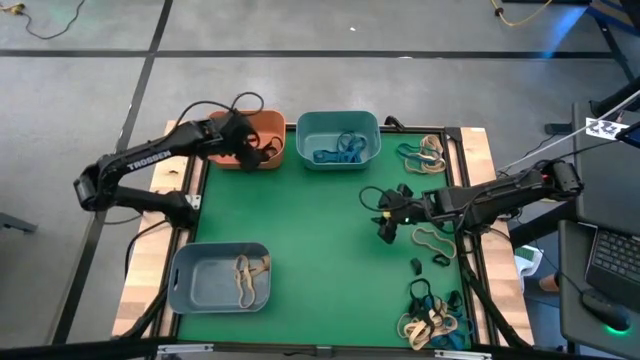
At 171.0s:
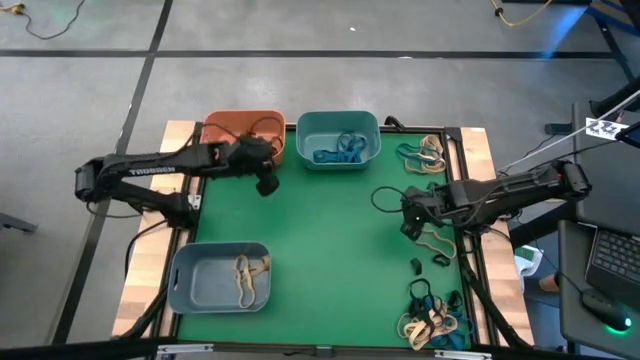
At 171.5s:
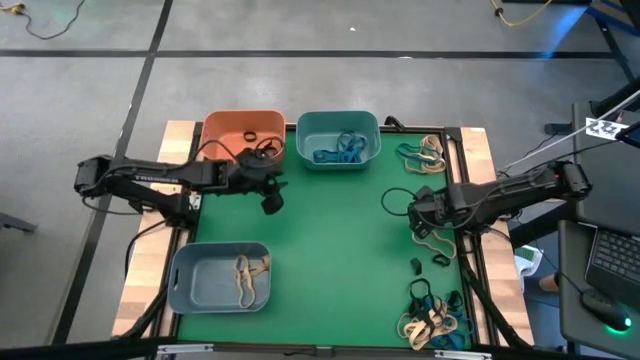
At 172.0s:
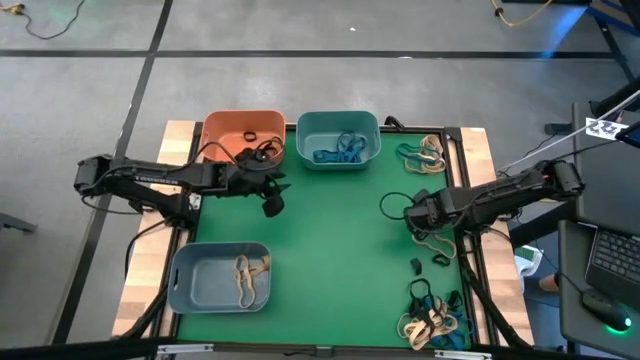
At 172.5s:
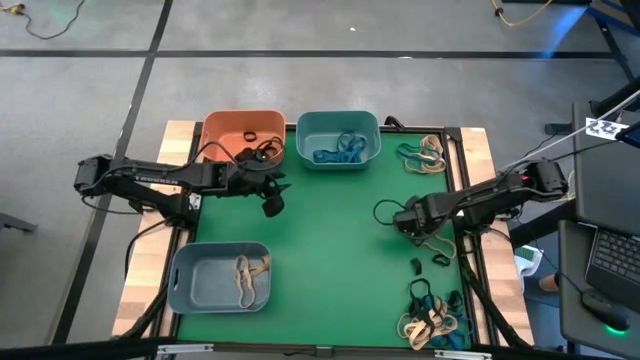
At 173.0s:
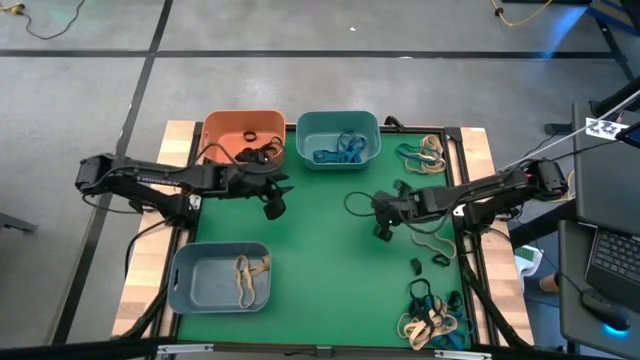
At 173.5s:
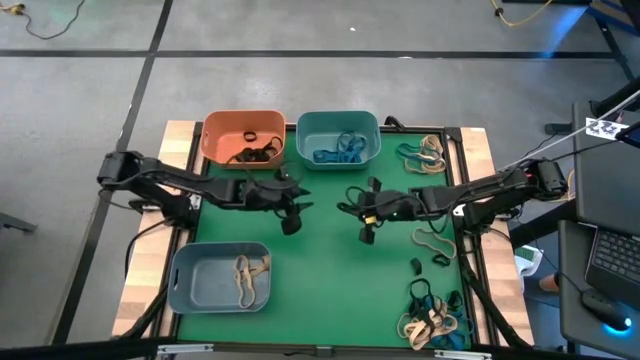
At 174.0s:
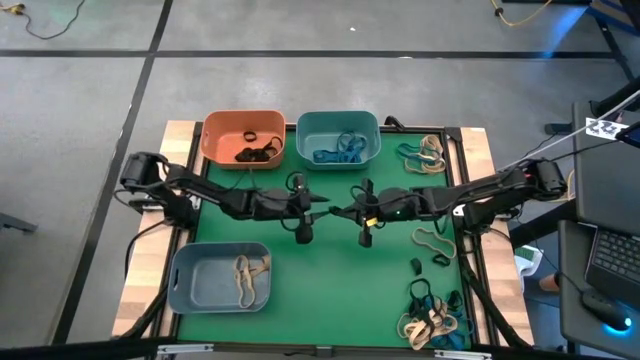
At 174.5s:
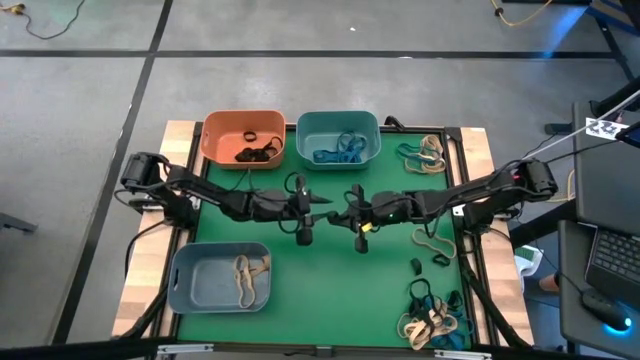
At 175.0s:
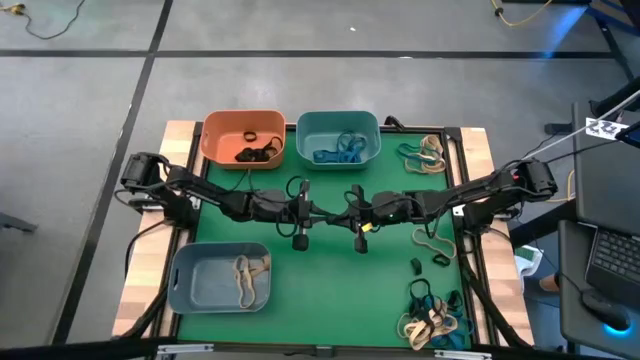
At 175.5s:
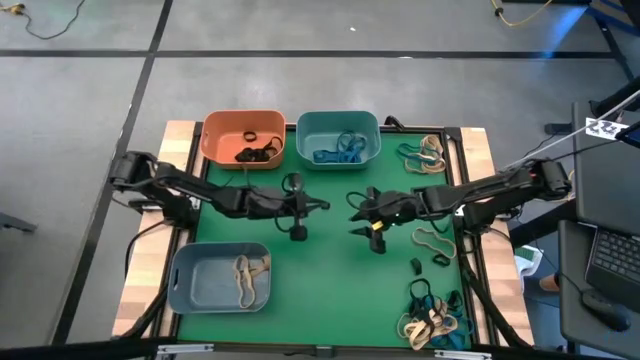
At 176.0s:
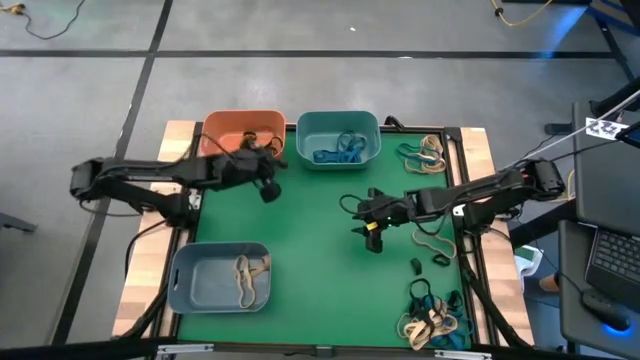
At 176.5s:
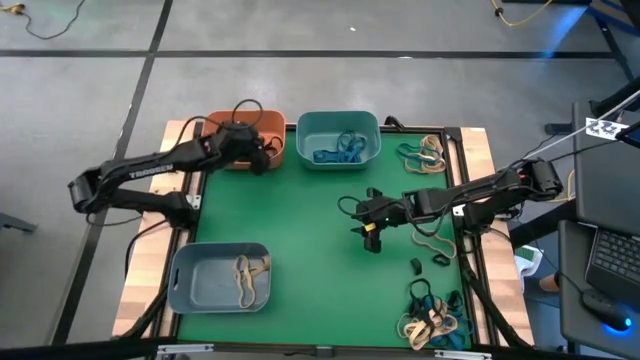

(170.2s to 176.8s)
Task: Sort rubber bands into baskets
Put the small black rubber band into the orange bin

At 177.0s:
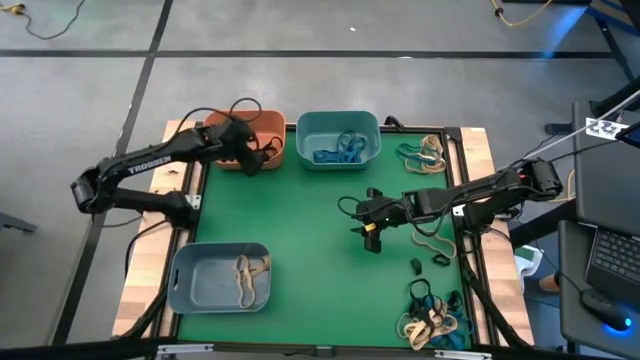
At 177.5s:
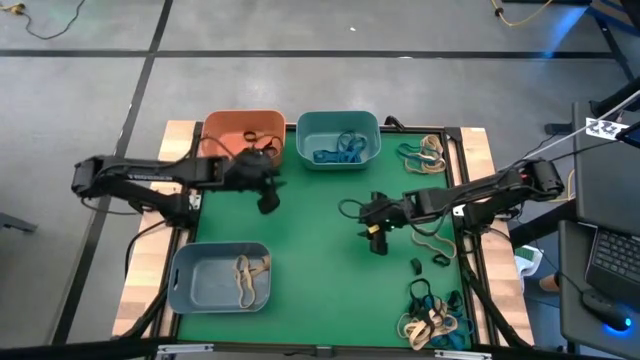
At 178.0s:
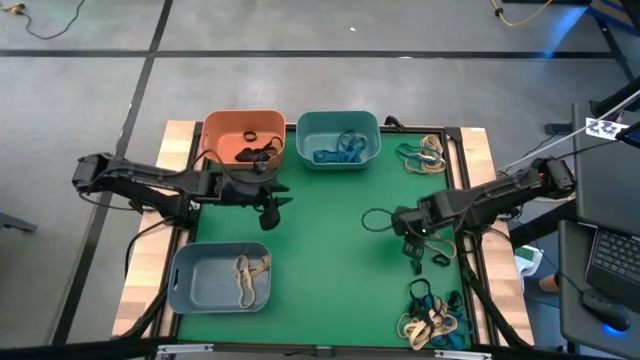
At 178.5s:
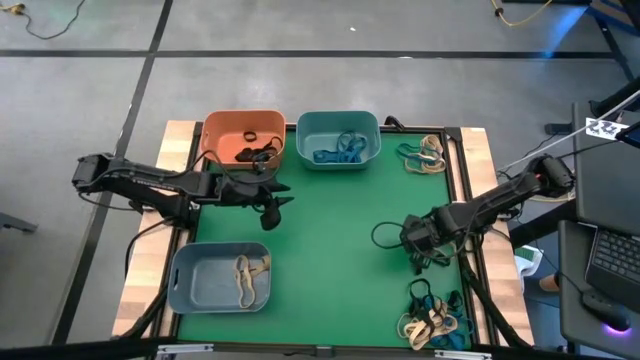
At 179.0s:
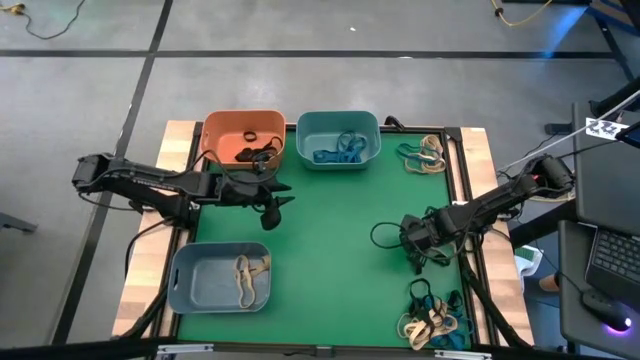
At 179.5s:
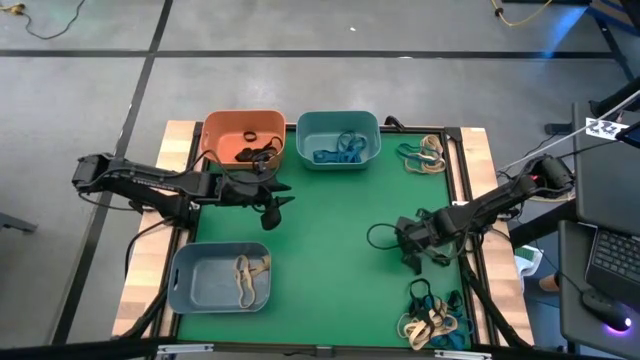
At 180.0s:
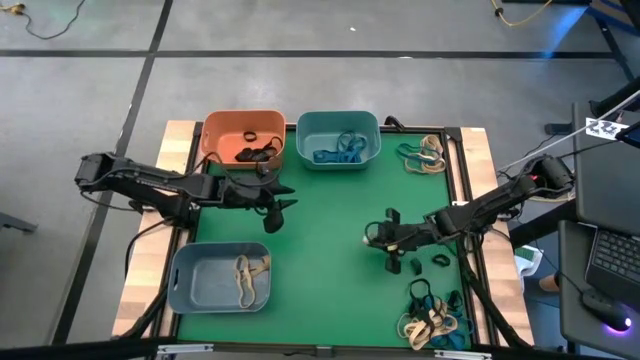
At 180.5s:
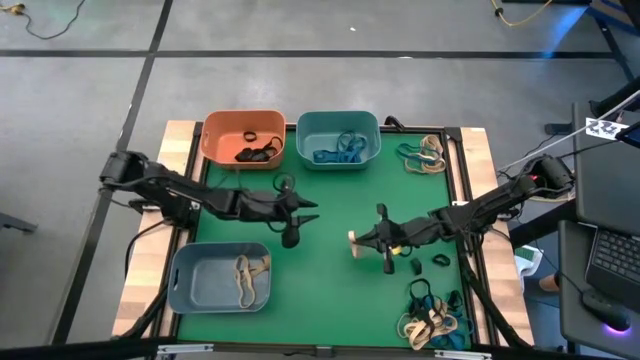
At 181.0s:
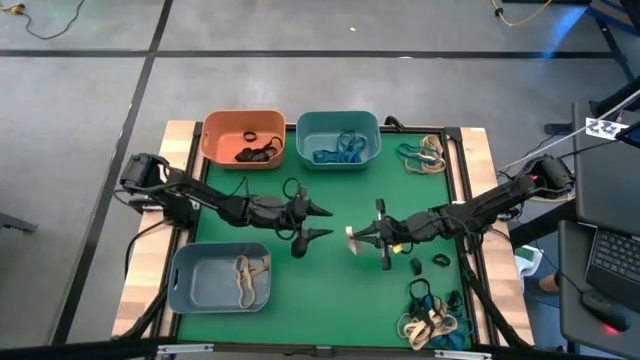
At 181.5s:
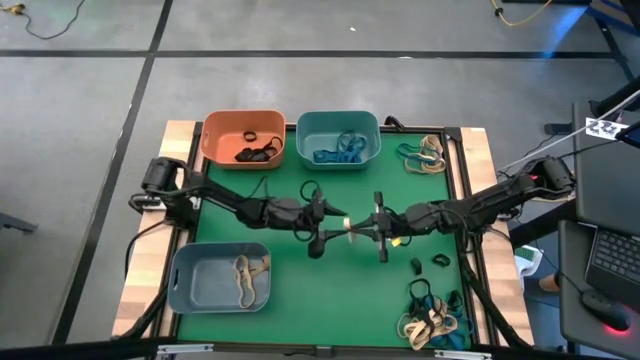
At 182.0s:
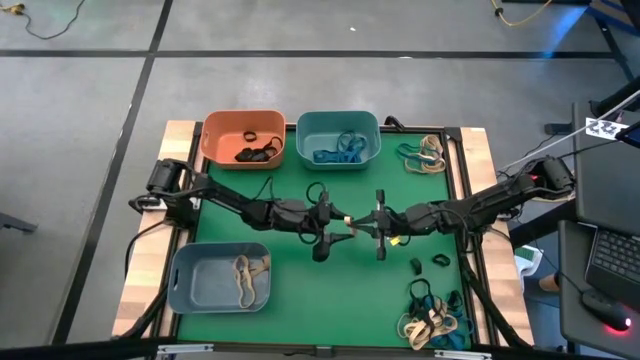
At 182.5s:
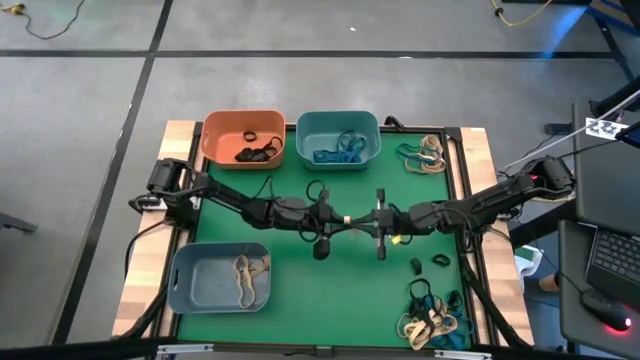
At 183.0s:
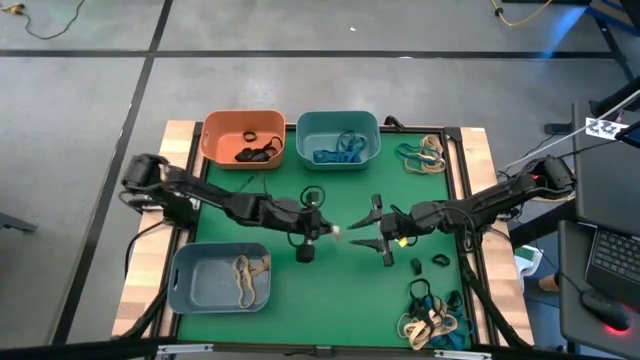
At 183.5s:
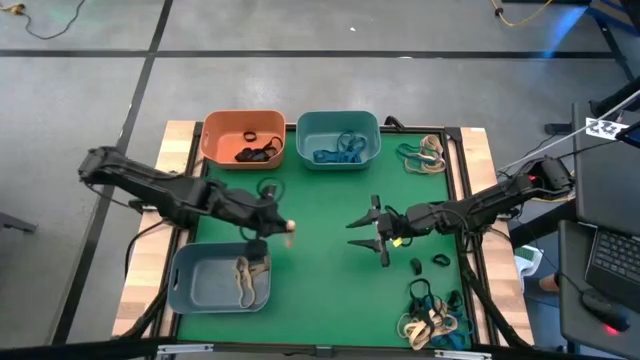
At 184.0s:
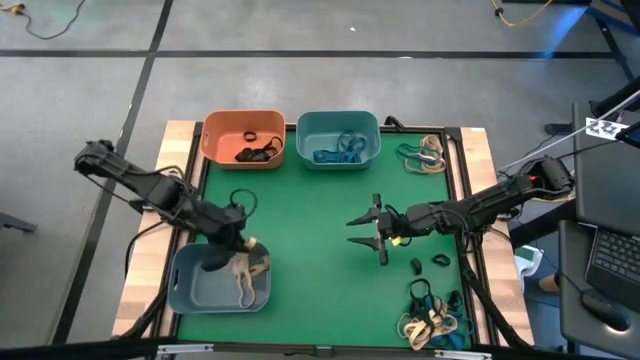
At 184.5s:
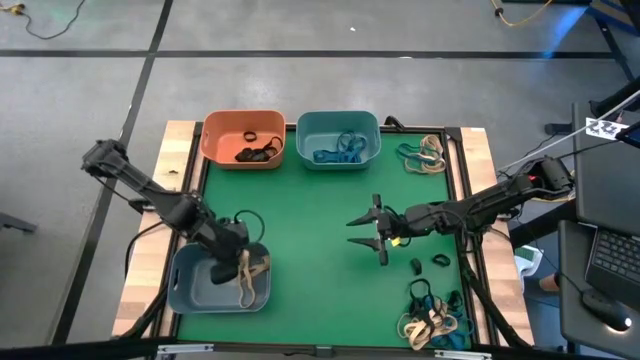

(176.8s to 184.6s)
Put the white rubber band into the blue bin

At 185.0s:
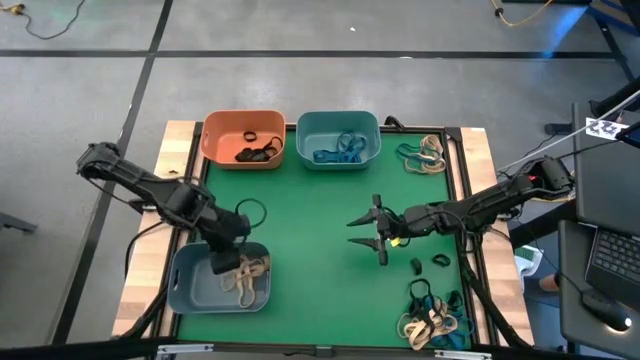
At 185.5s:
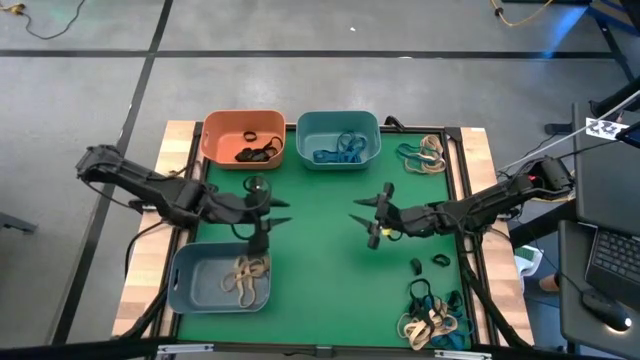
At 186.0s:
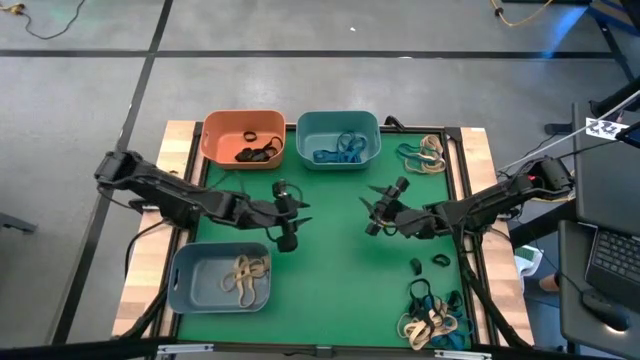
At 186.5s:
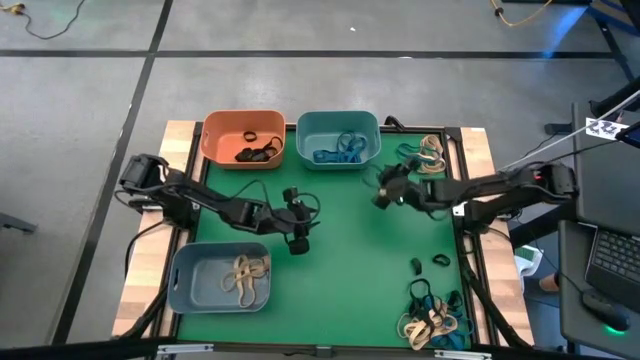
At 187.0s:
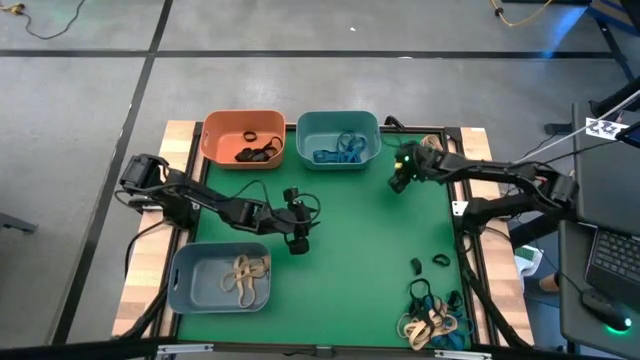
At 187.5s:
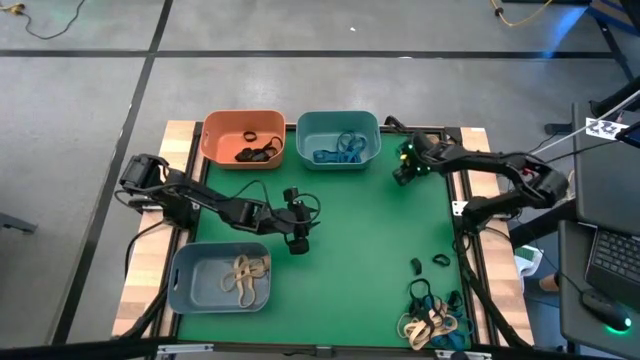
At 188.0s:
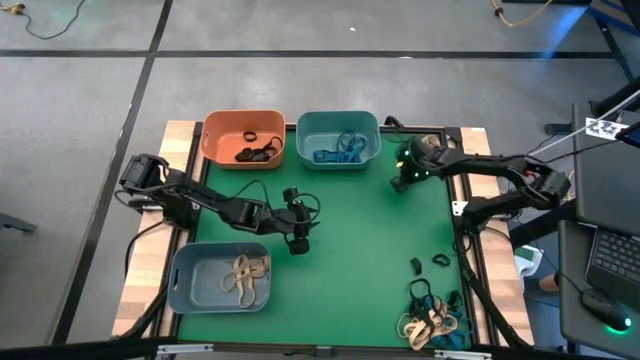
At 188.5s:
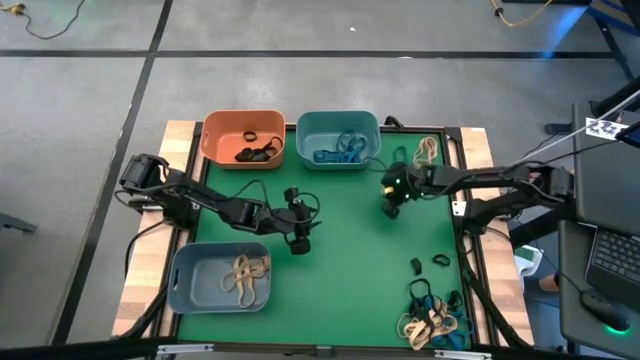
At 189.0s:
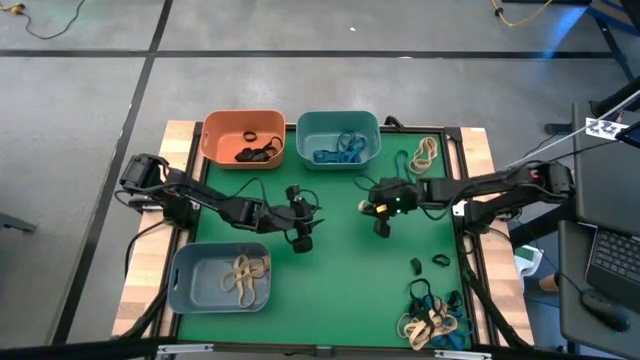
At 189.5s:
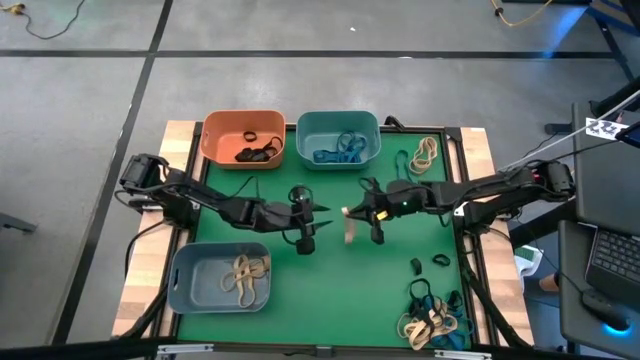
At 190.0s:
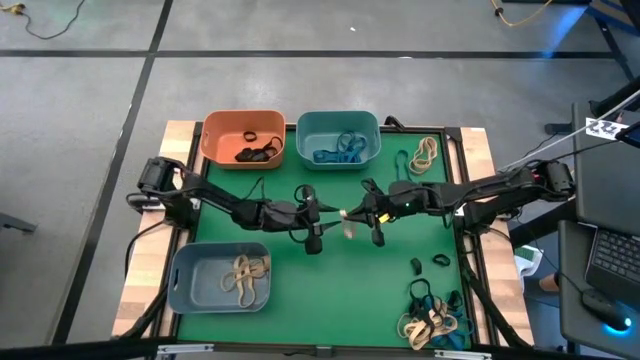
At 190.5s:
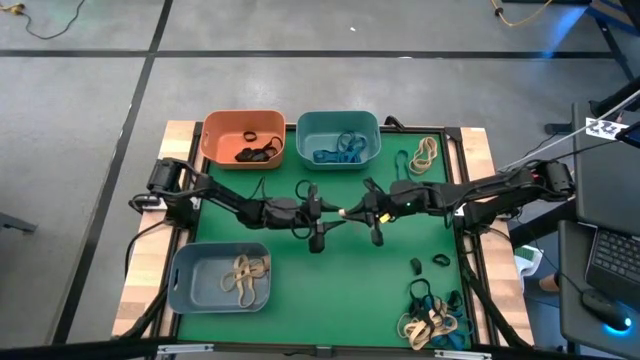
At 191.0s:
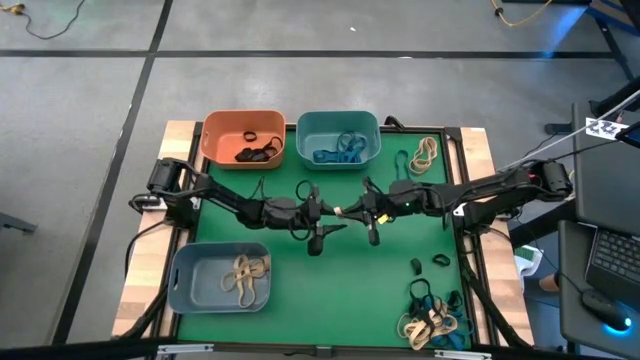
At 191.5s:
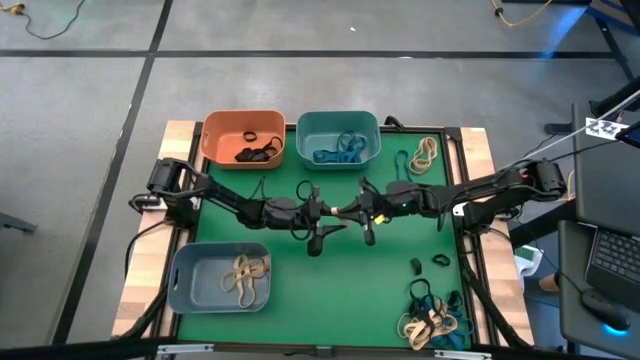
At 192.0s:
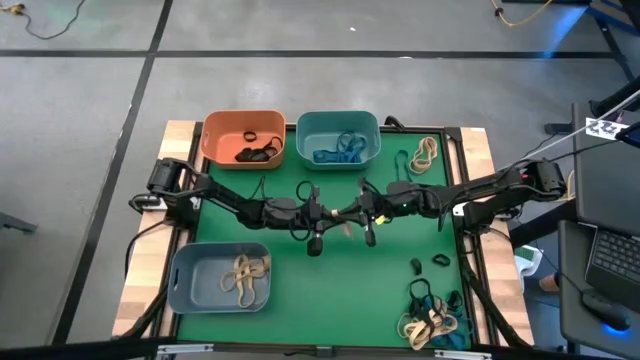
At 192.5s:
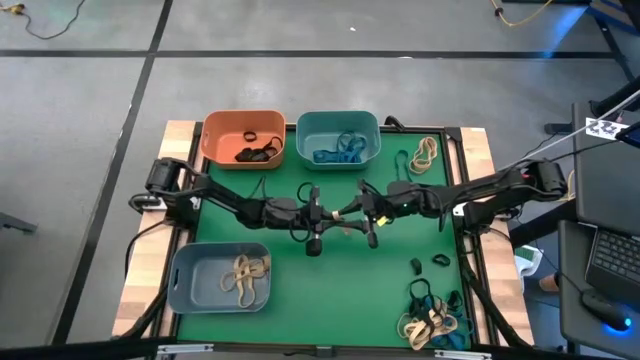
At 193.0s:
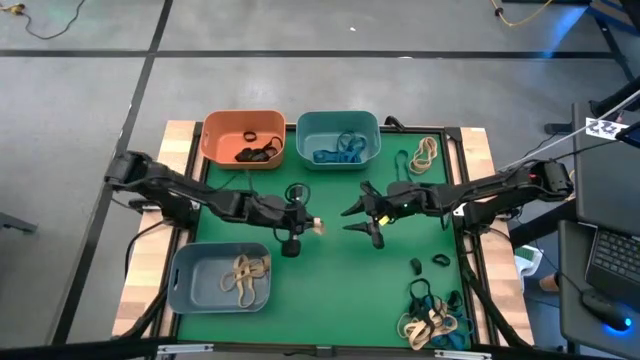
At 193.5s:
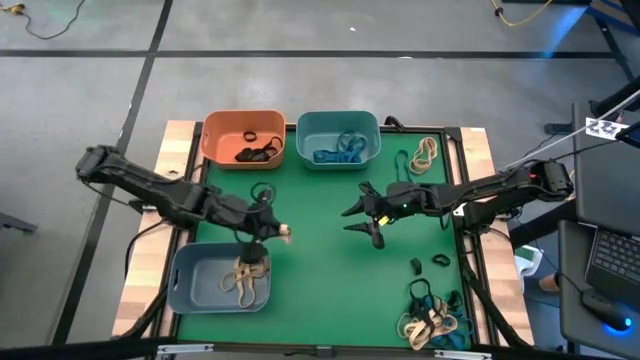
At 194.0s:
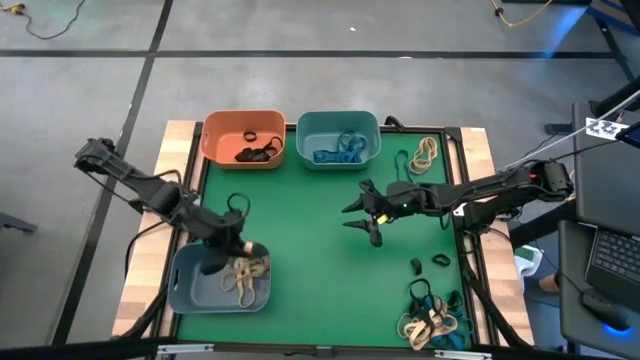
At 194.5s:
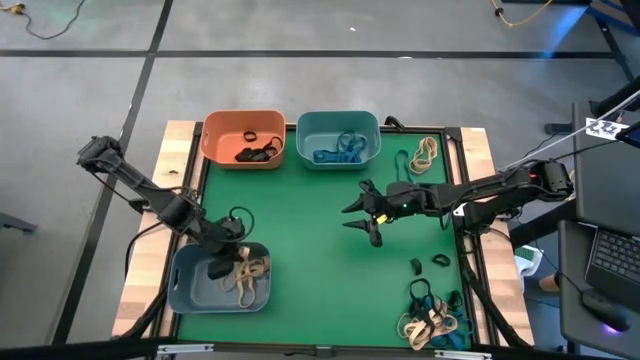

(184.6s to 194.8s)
Put the white rubber band into the blue bin
